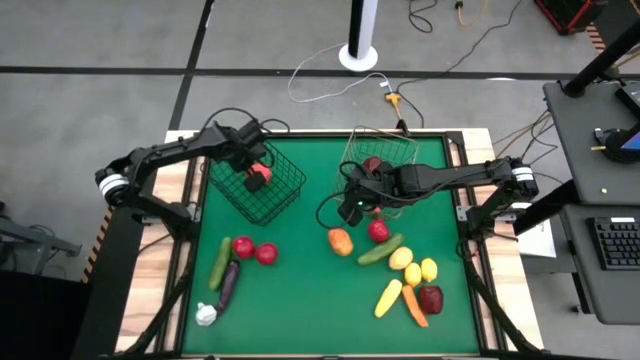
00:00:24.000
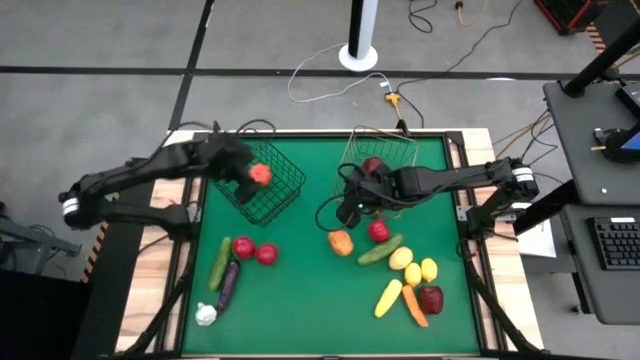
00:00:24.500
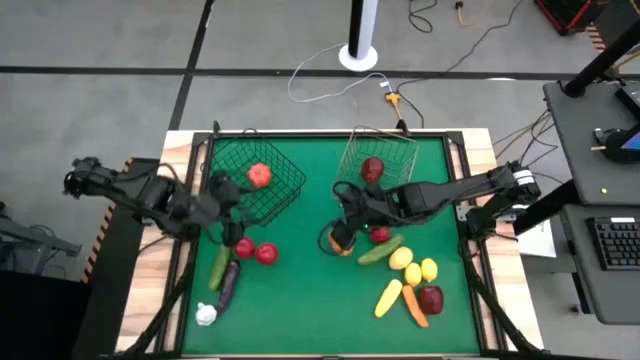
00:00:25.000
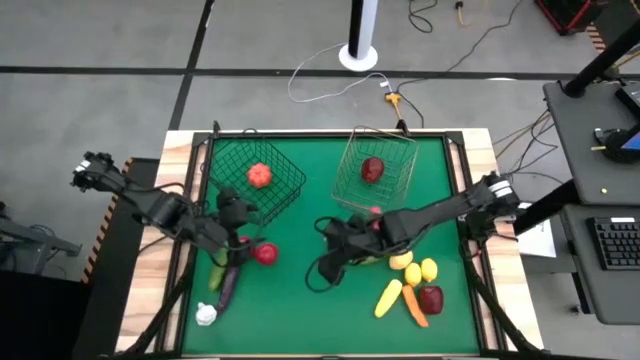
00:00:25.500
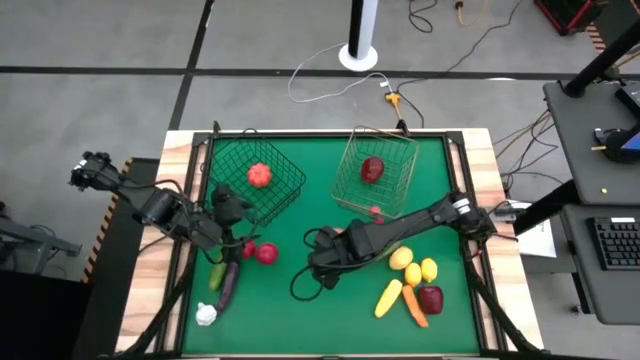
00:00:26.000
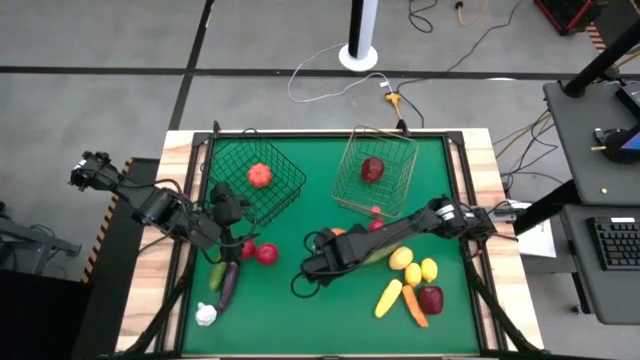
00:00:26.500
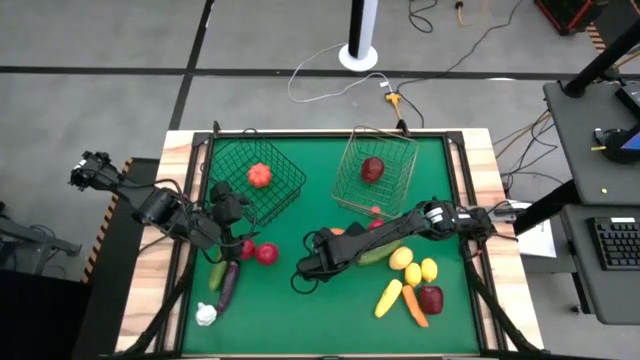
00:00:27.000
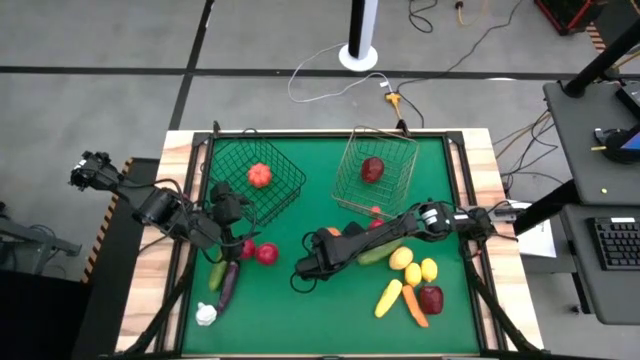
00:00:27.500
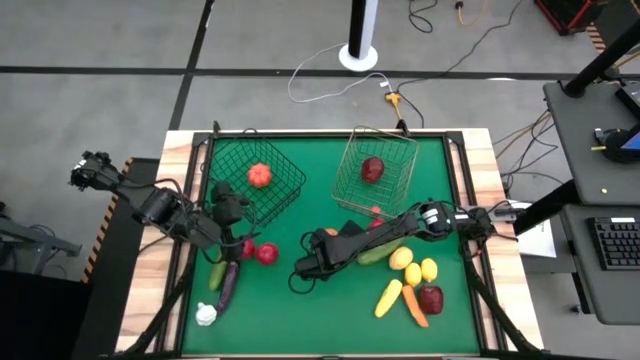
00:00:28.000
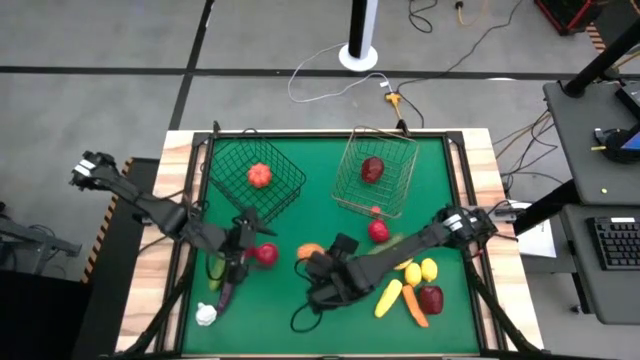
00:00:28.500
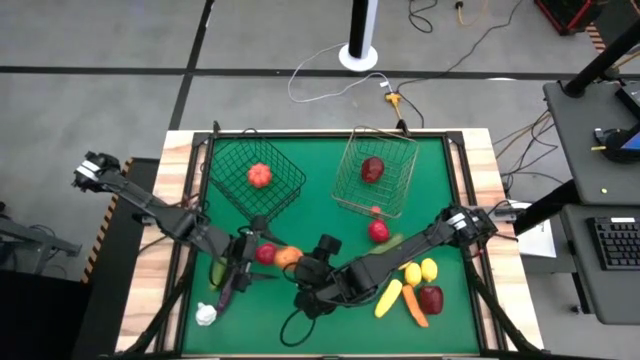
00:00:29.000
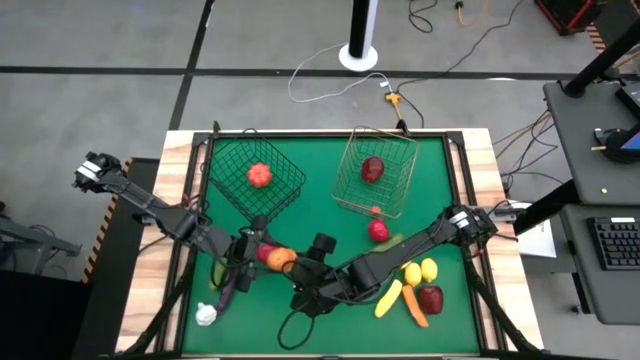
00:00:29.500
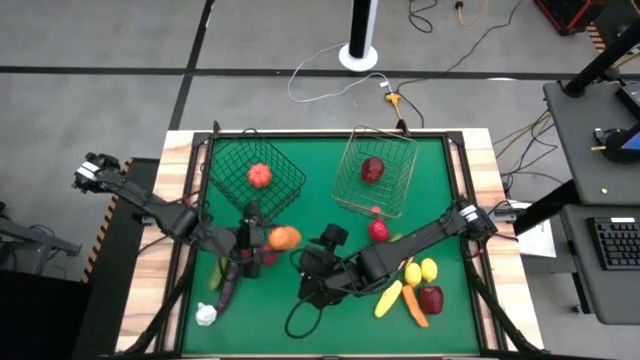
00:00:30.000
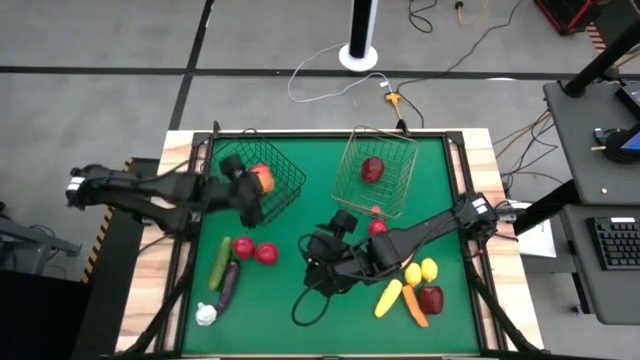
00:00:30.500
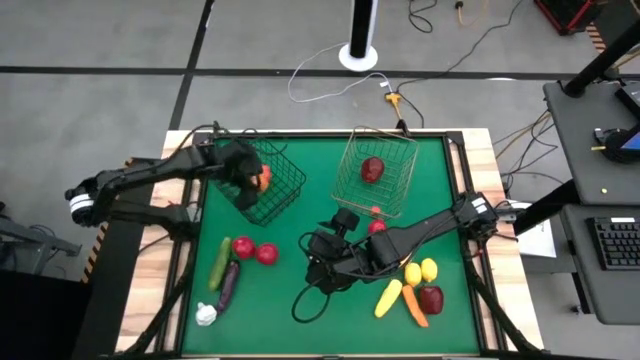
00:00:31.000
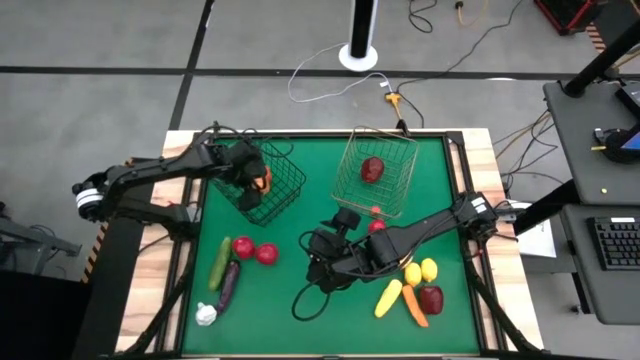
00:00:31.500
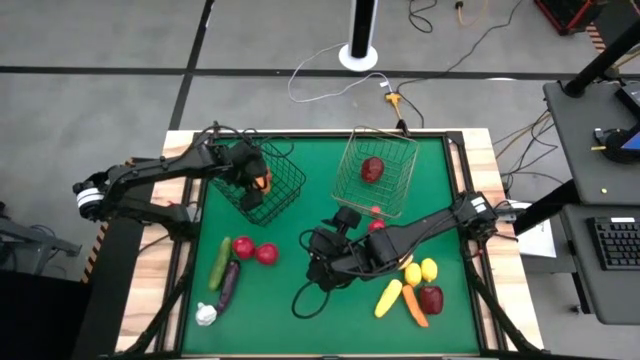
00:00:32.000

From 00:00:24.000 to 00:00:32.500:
Task: Sort produce into baskets
Put the brown potato into the black wire basket

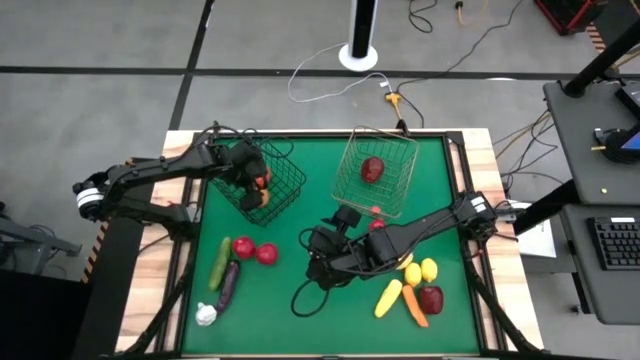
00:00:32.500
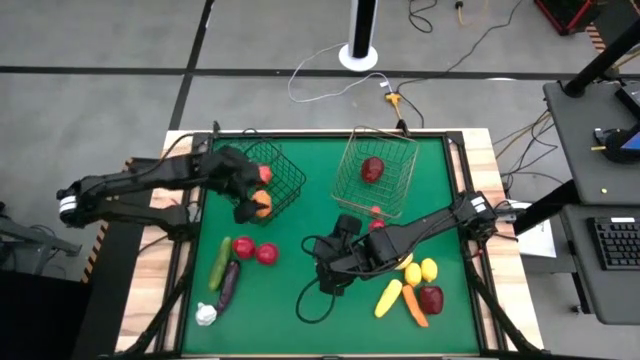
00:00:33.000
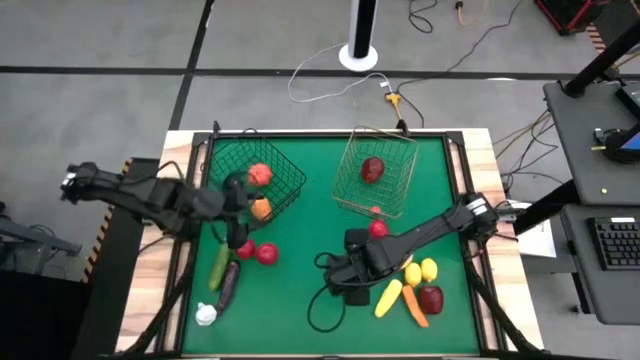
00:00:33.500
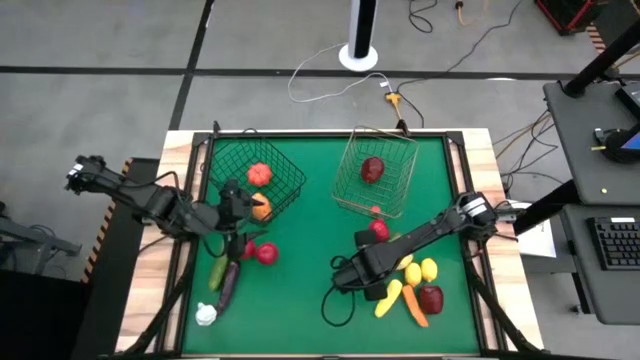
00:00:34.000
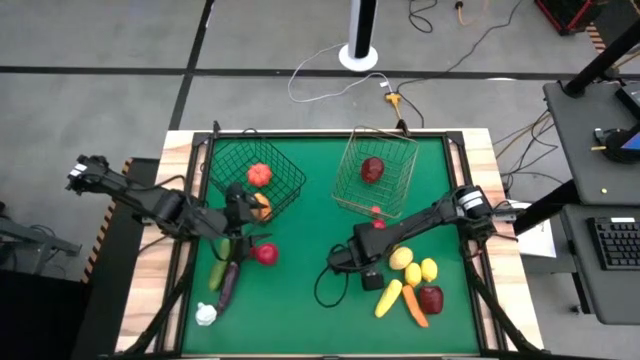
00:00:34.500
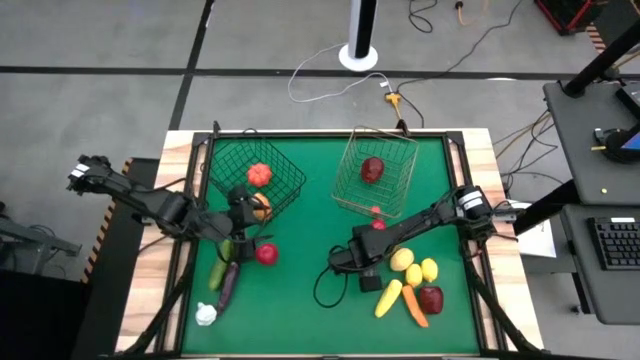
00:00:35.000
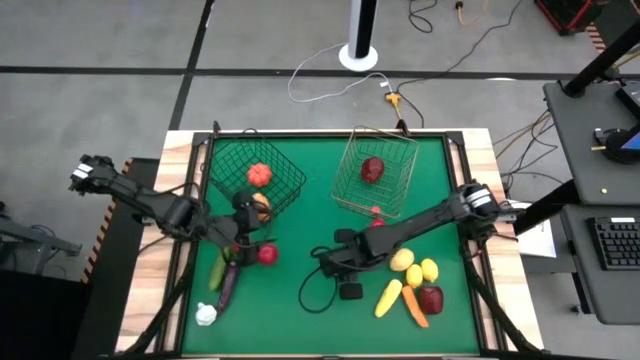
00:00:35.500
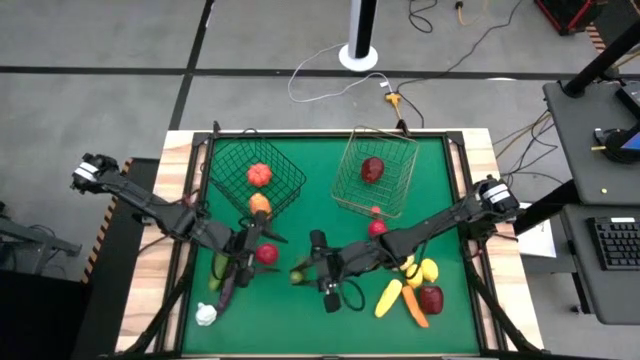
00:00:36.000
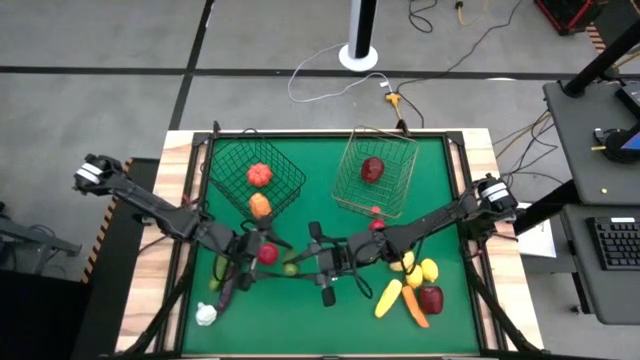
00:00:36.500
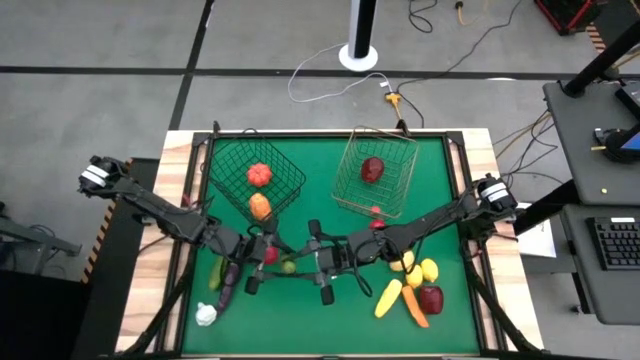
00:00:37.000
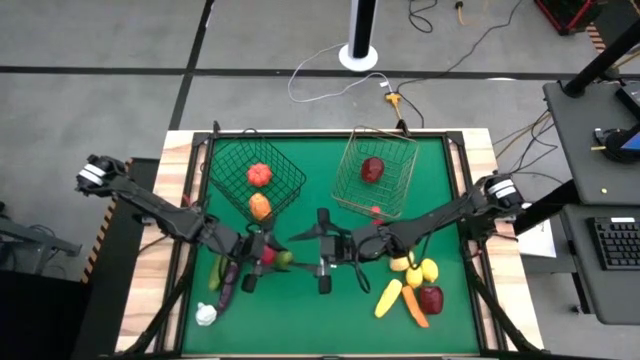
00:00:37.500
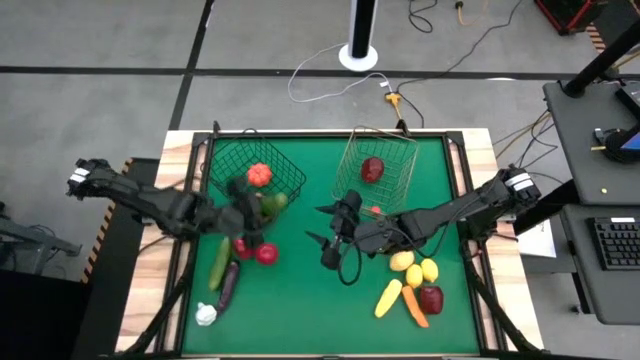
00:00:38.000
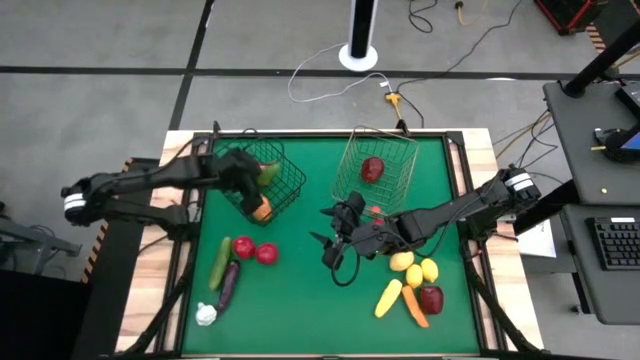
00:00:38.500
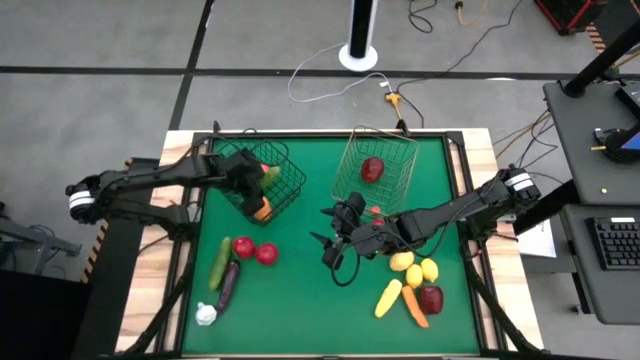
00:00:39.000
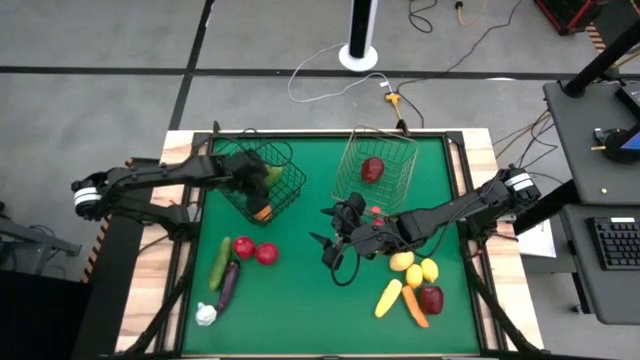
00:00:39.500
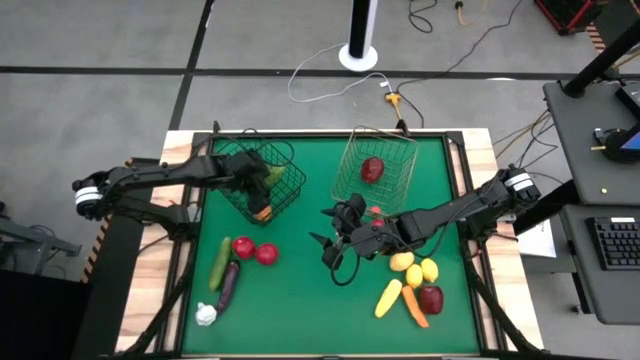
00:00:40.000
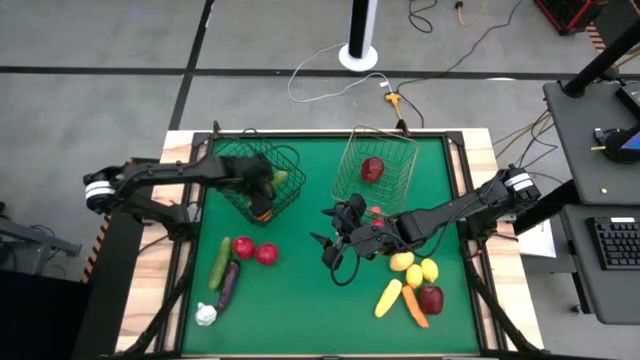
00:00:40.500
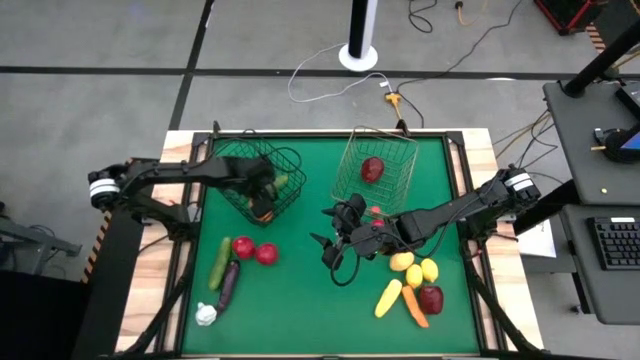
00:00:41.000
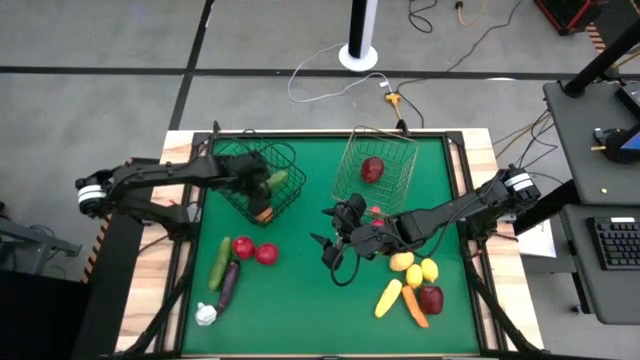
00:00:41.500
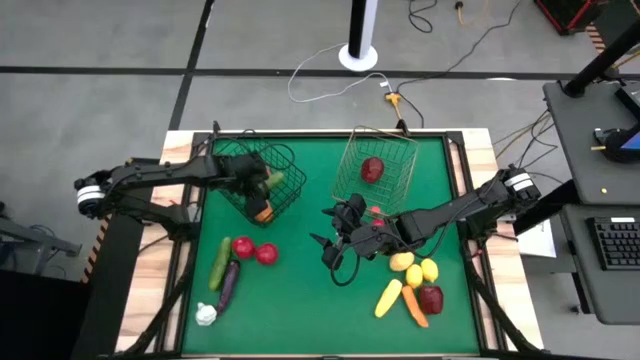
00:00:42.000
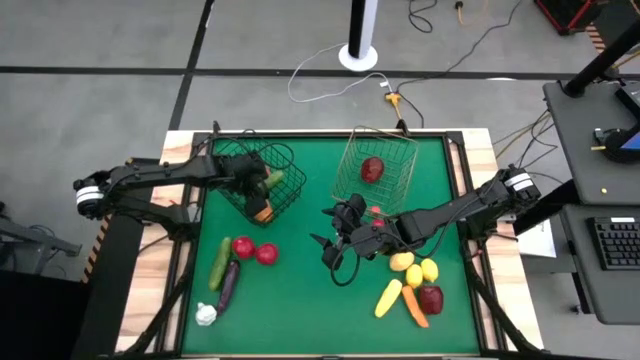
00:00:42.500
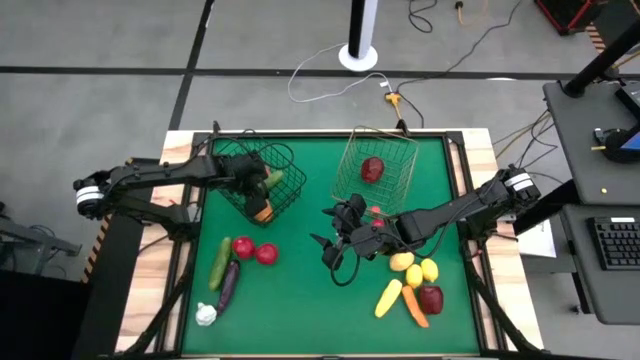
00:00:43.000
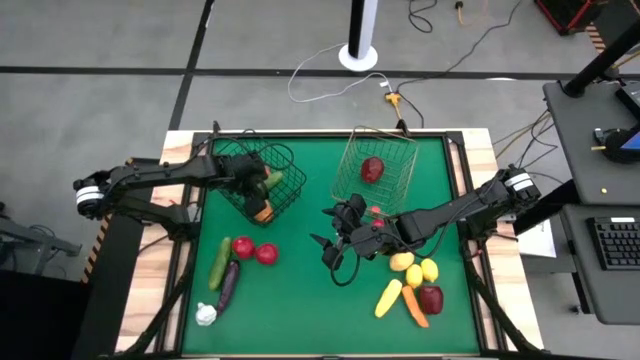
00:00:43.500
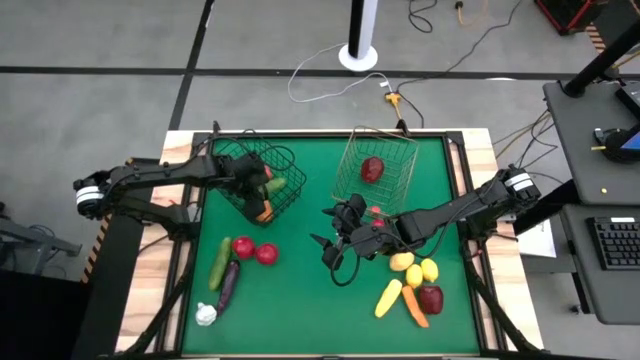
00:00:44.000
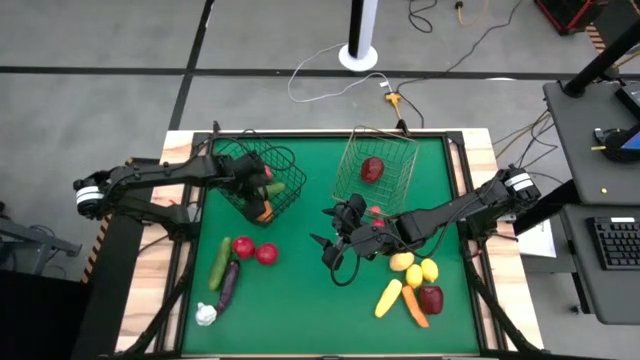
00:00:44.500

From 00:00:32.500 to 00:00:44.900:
Put the right green cucumber into the black wire basket
